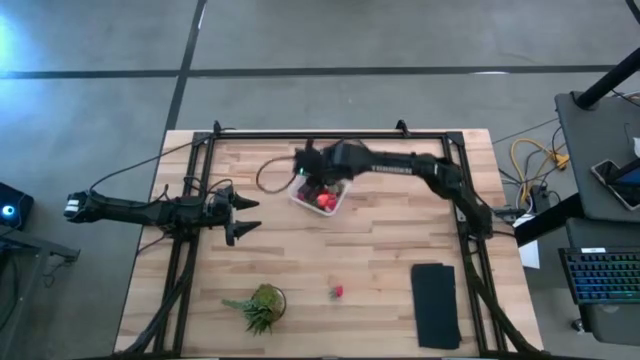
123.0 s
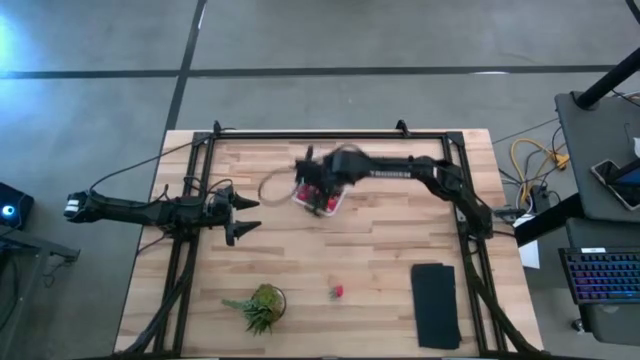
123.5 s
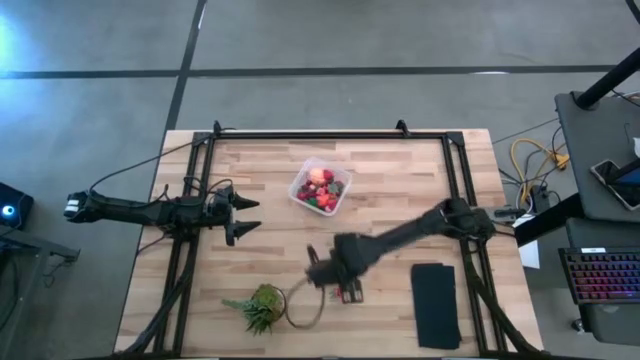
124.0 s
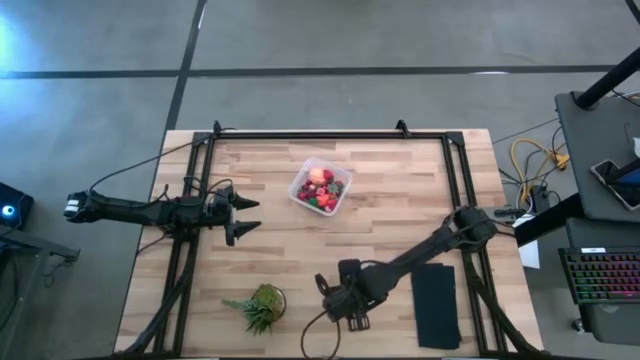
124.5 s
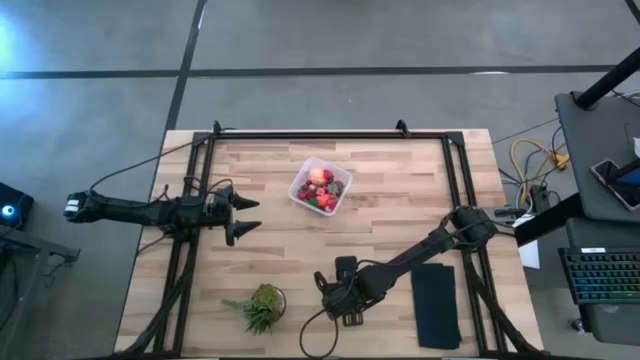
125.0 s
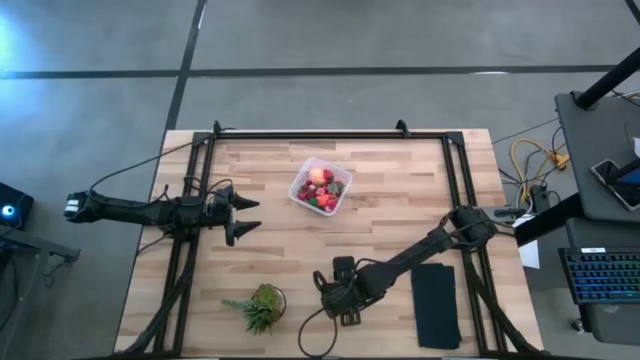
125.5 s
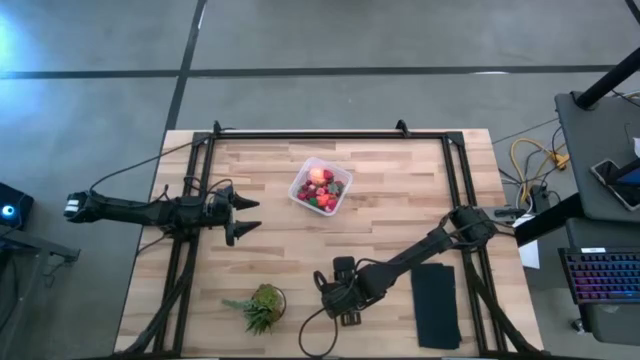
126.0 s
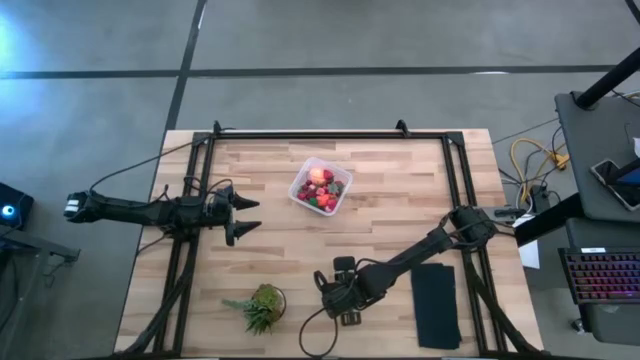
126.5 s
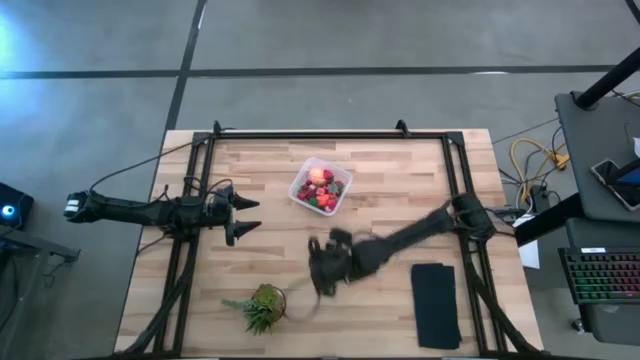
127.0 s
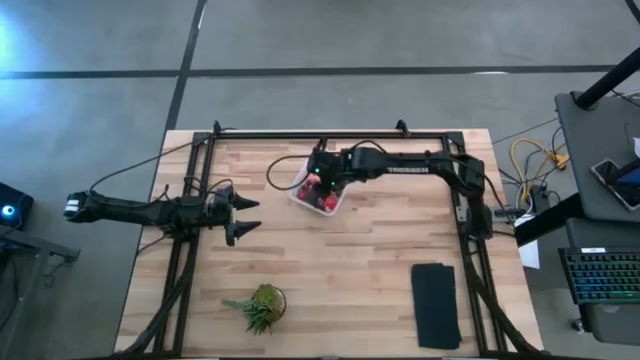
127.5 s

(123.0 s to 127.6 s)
Task: Pick and placing Produce into tupperware
Put the red strawberry into the transparent bin

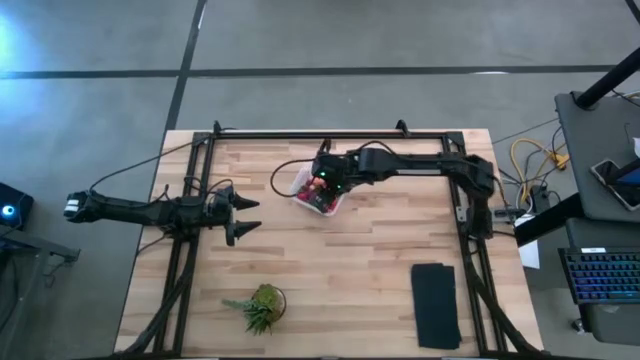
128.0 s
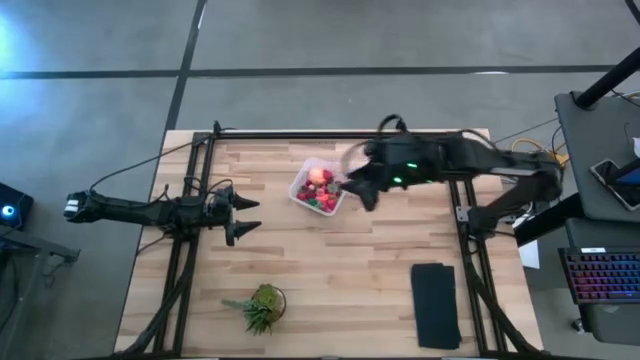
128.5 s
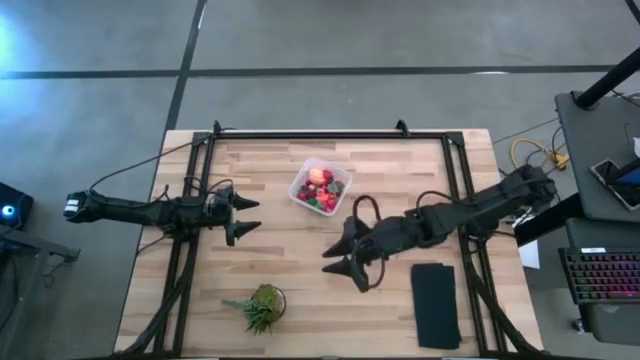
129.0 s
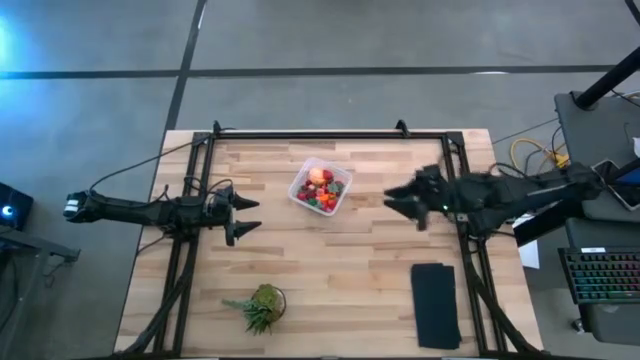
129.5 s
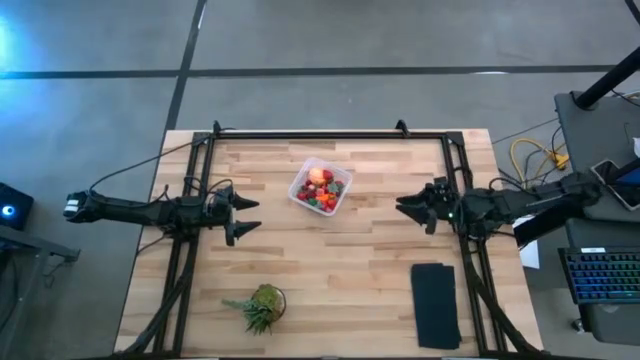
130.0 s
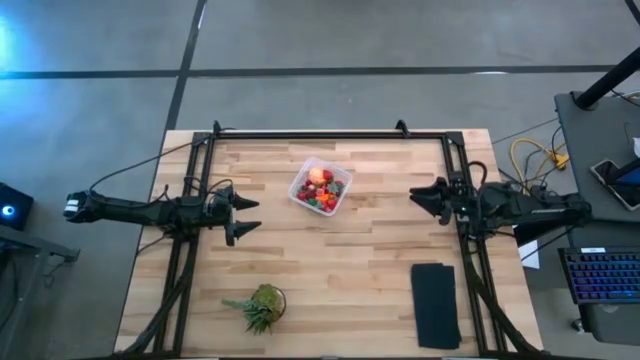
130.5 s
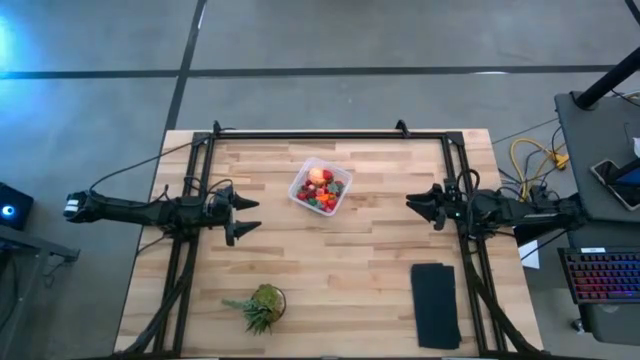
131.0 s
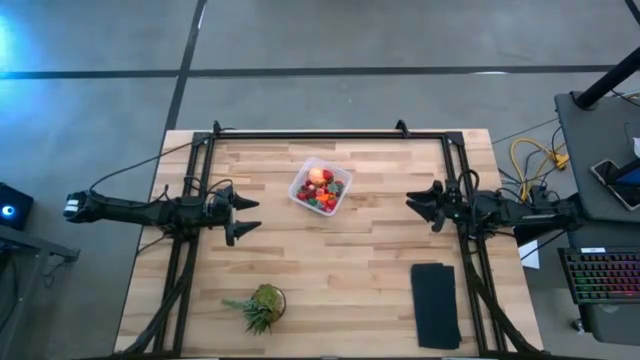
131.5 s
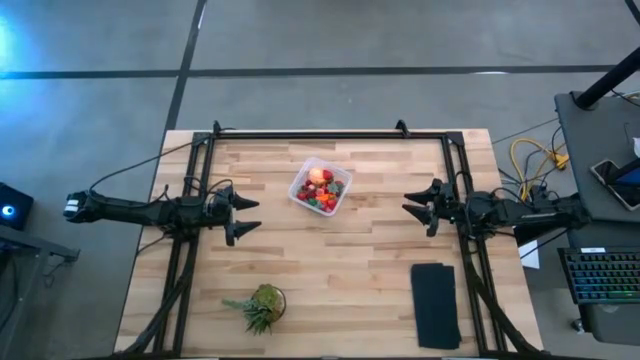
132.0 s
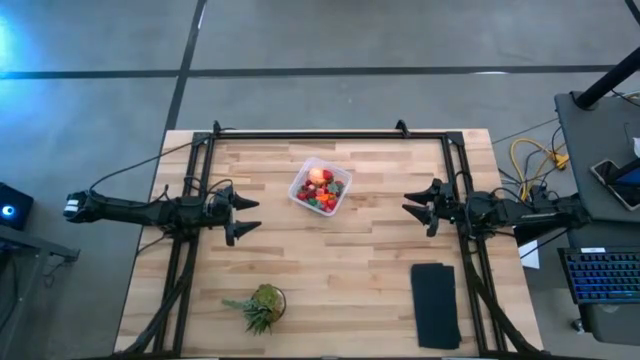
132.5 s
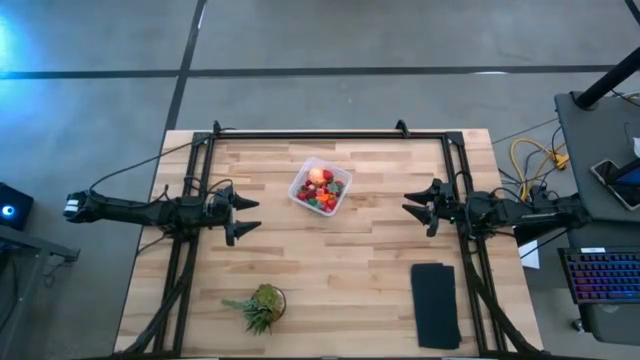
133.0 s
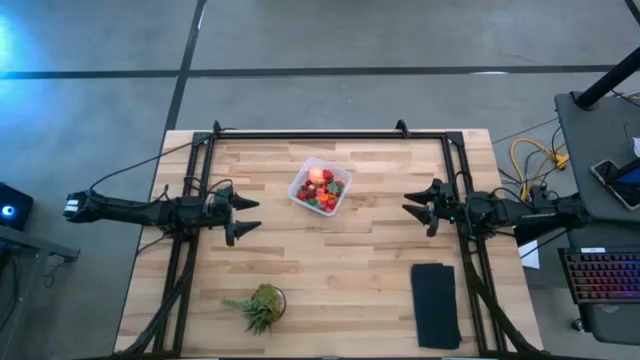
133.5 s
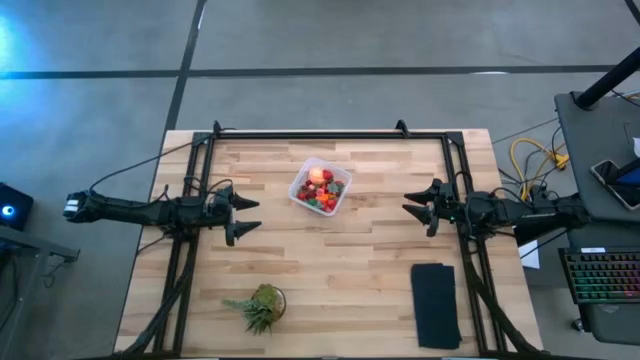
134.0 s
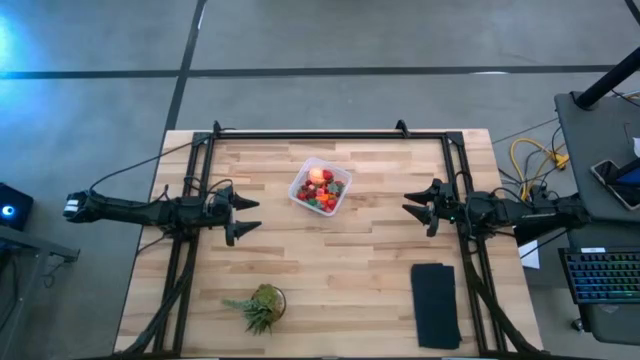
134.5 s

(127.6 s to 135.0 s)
Return to Home Position

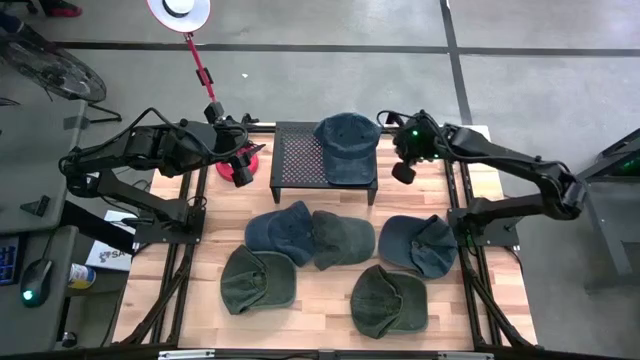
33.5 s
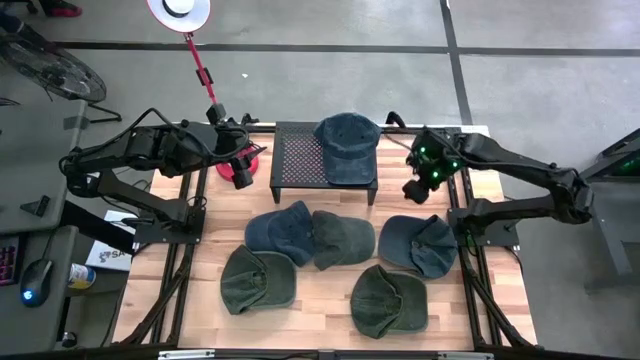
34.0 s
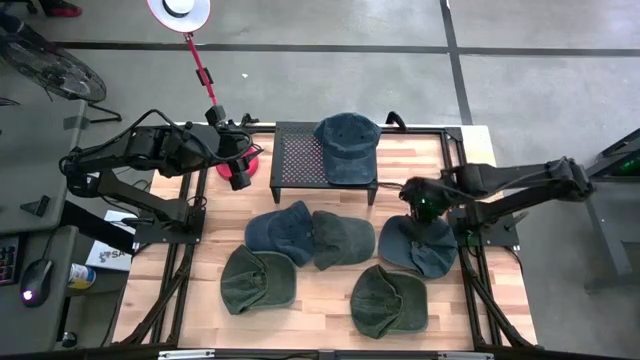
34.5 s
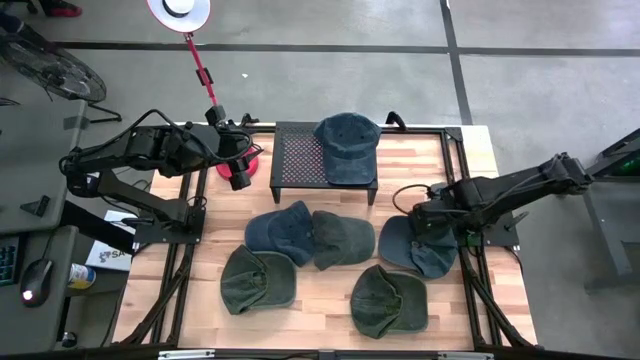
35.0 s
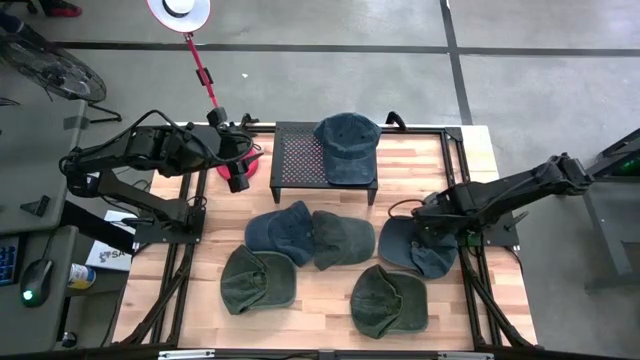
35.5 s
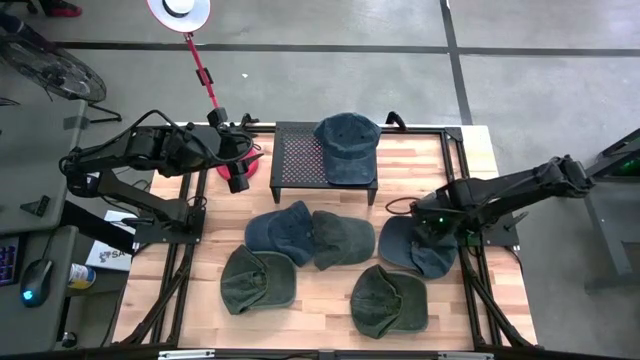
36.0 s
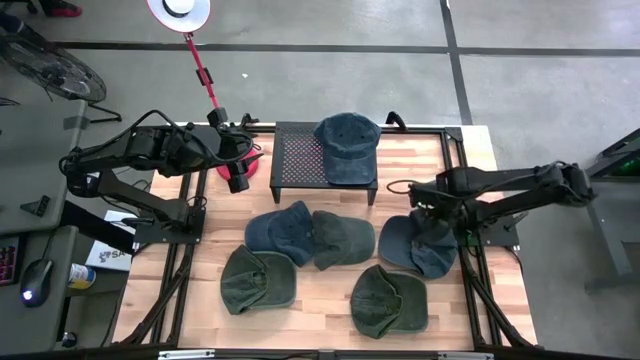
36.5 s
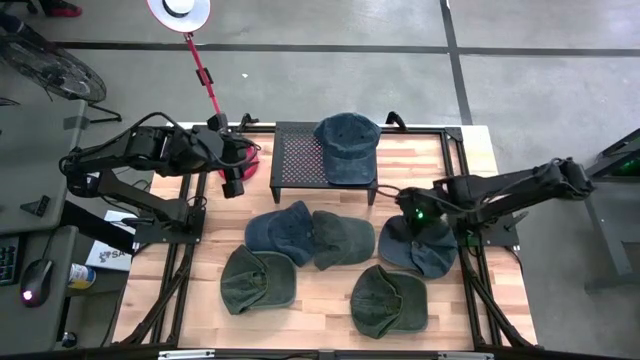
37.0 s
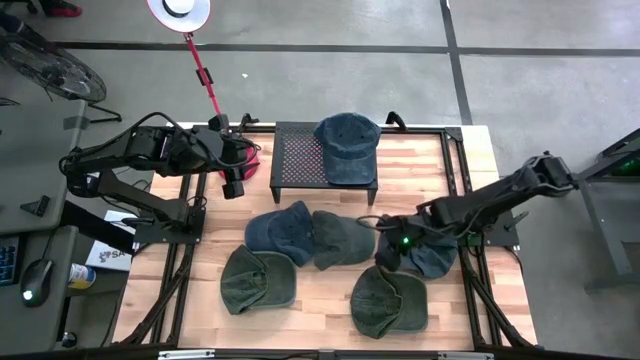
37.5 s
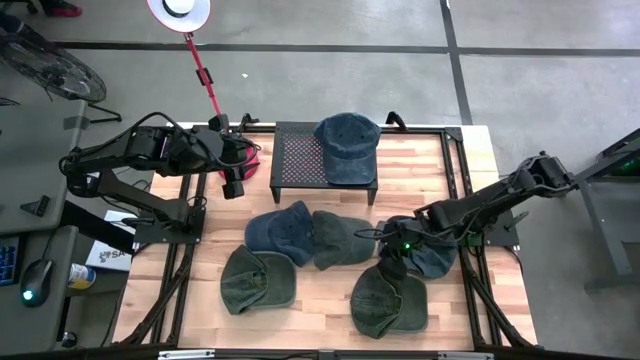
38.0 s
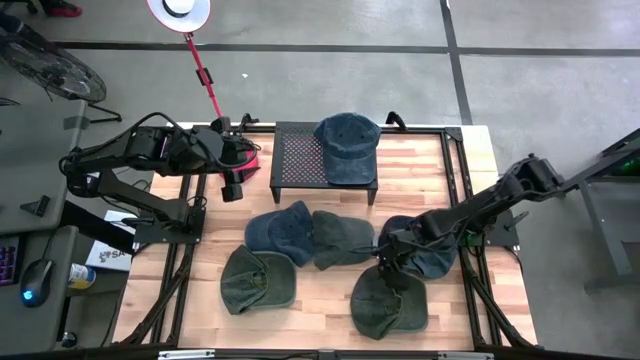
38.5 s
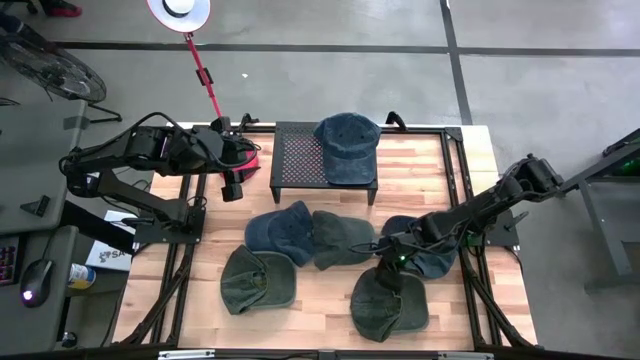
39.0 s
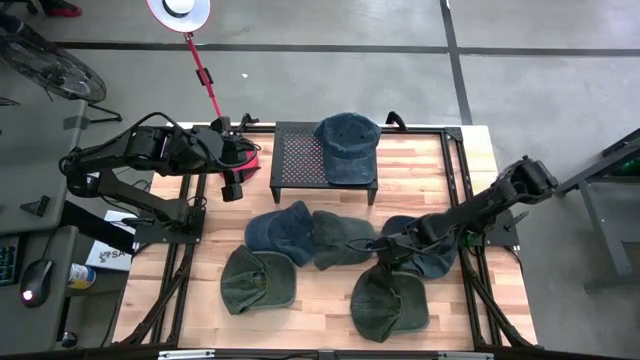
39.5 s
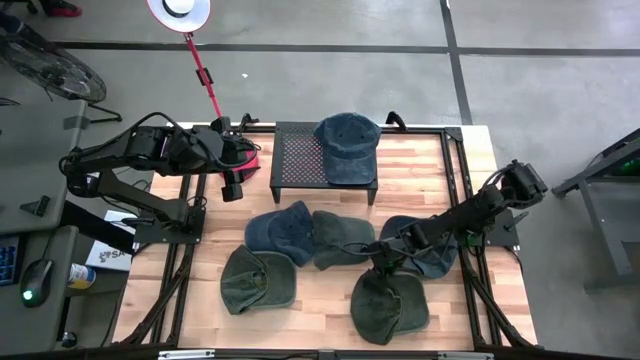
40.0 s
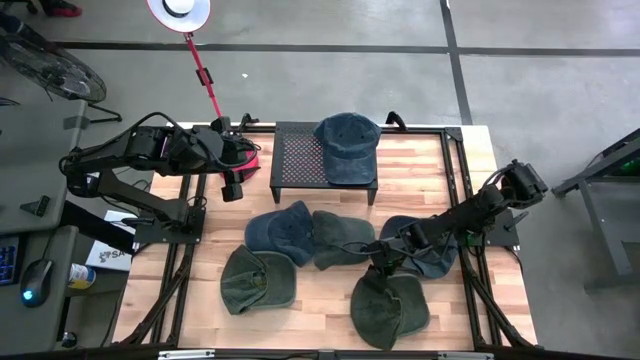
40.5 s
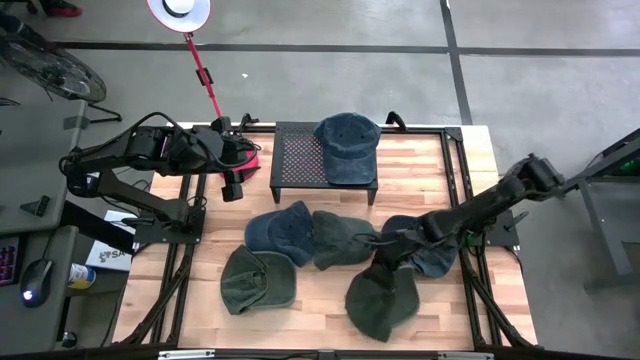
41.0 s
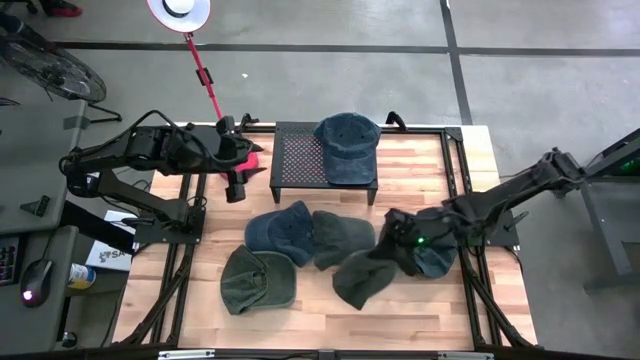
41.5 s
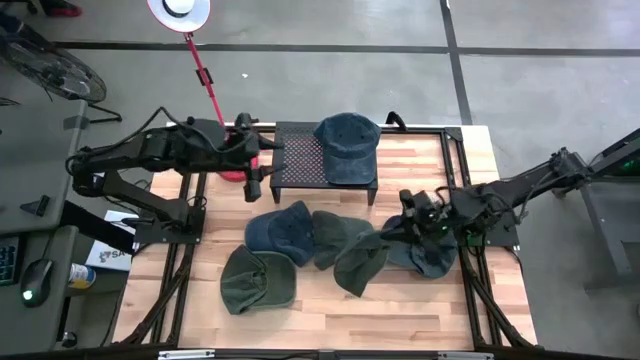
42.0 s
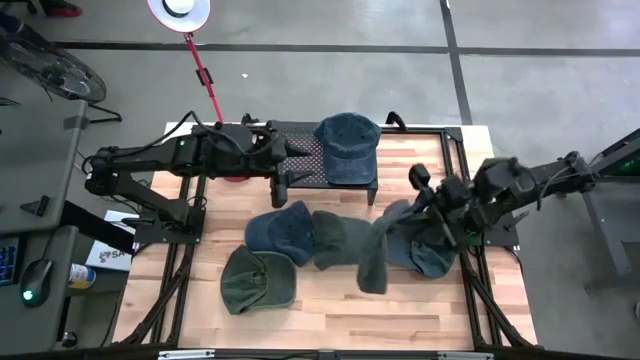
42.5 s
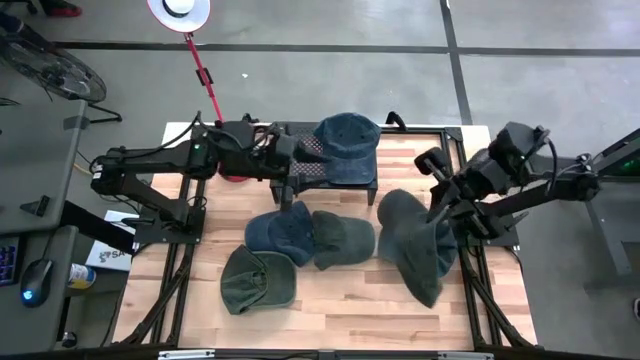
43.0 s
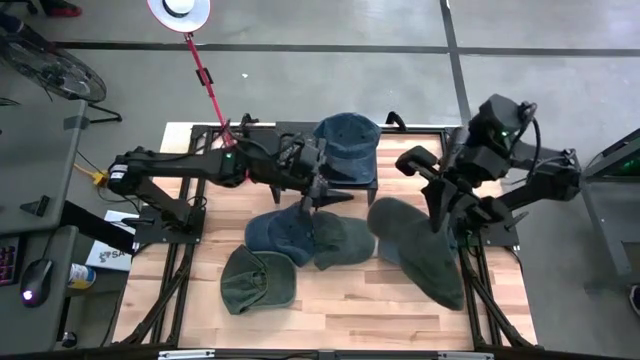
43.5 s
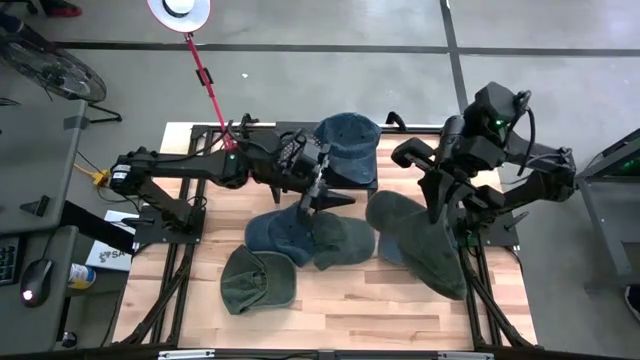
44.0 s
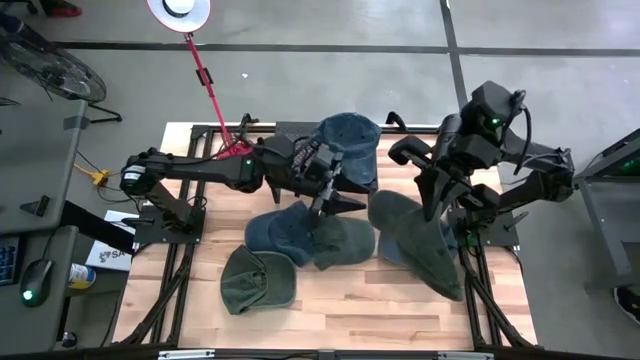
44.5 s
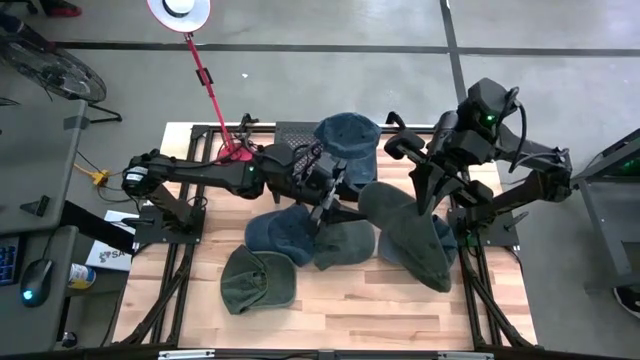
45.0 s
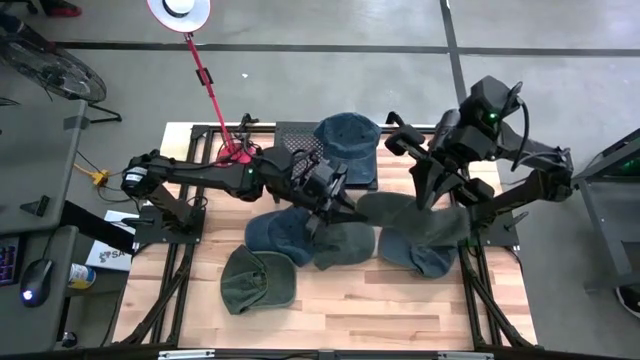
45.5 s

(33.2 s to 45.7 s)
Task: Pick & Place hat
Put the bottom right gray cap to the left of the blue cap on the shelf
